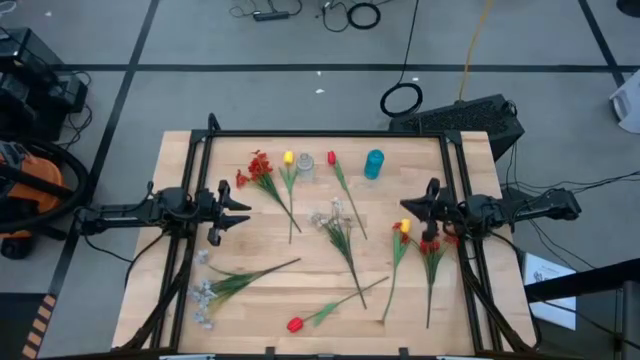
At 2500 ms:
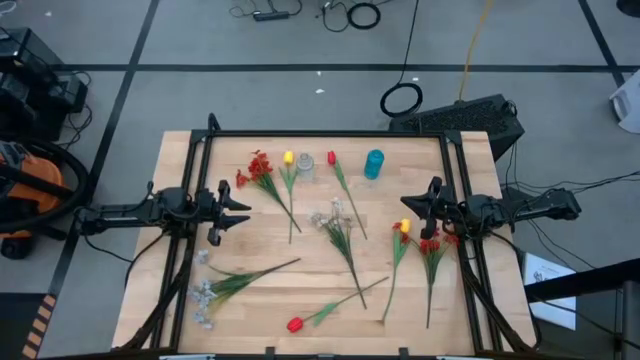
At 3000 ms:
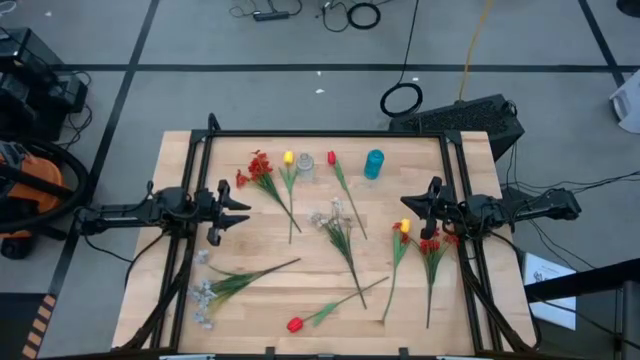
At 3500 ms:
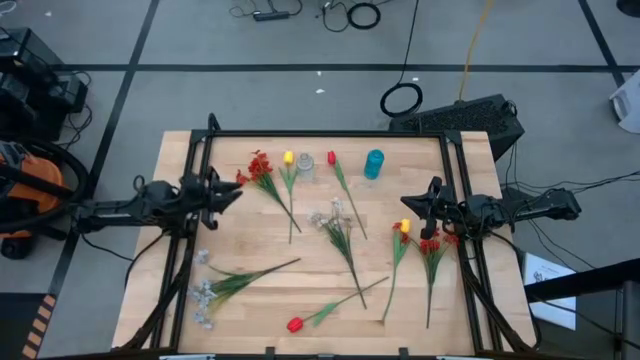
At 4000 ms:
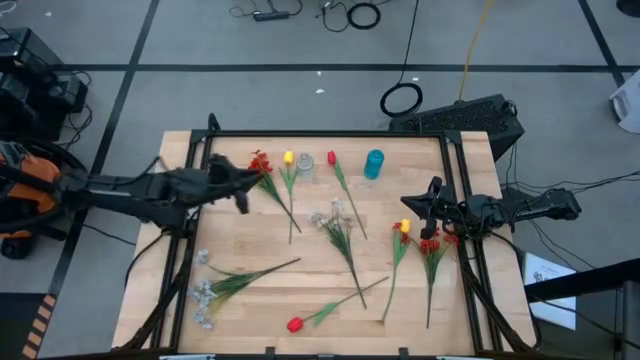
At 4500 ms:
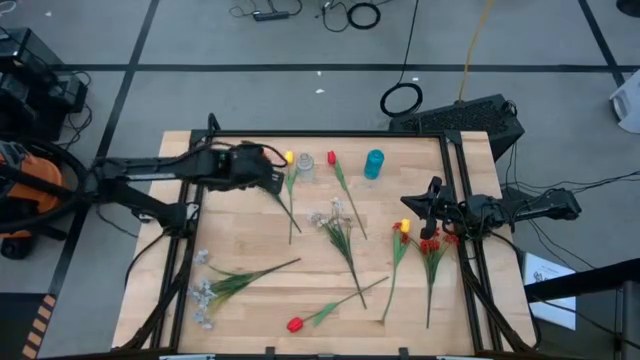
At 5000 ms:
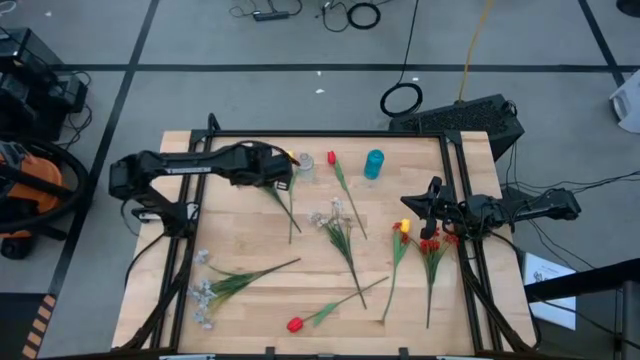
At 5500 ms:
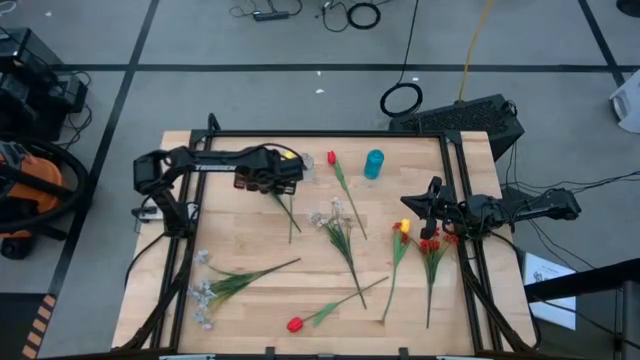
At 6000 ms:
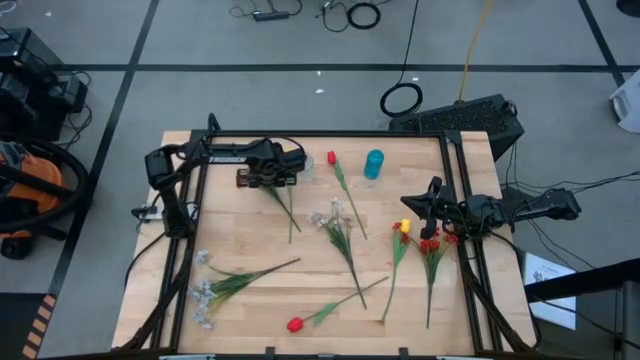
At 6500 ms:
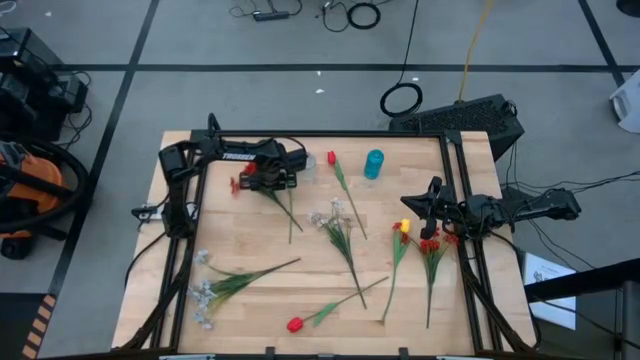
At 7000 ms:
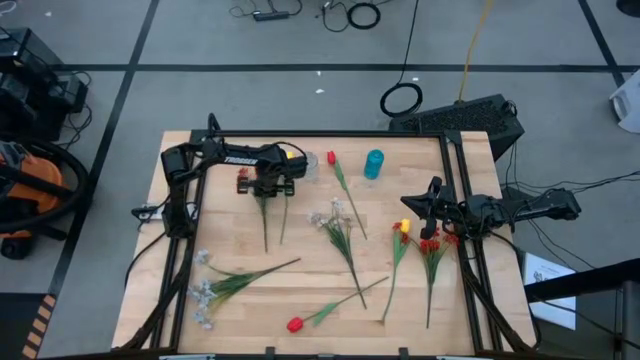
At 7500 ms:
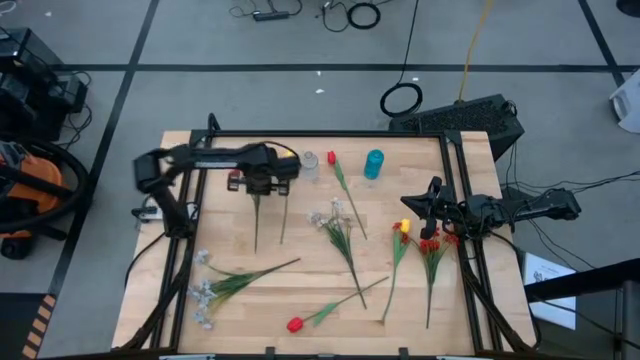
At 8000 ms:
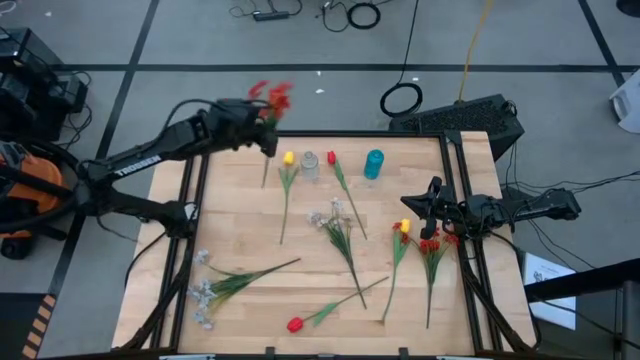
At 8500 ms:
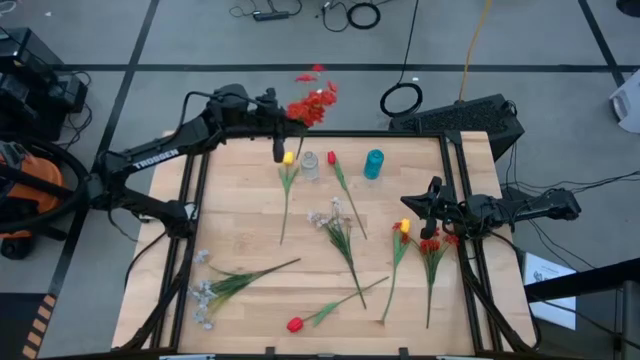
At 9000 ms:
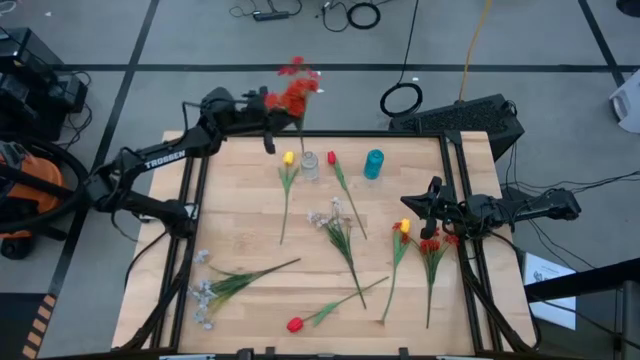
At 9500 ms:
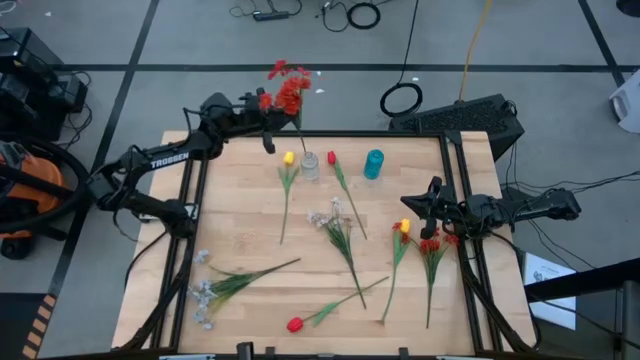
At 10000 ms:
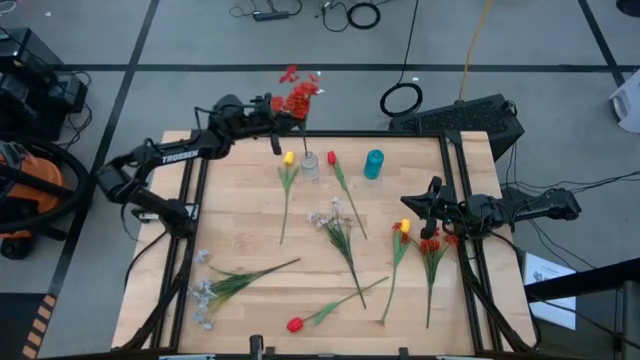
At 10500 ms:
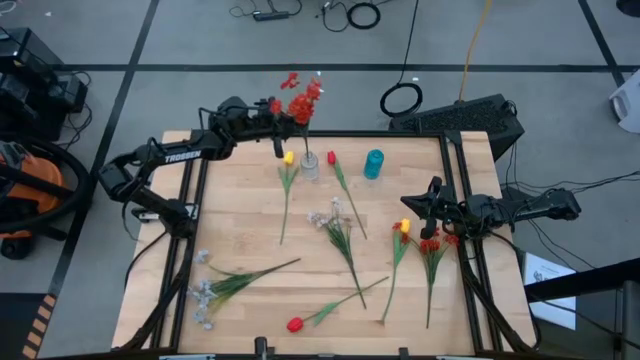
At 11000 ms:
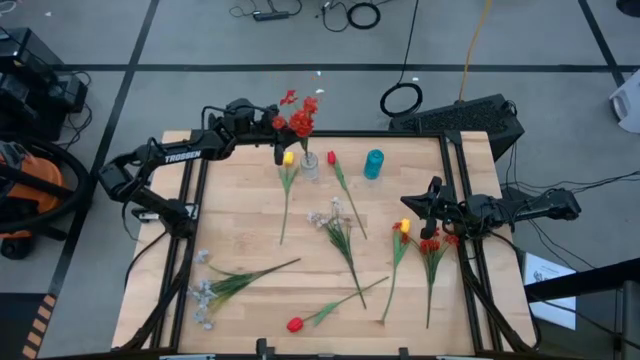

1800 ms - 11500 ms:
Task: Sort flowers into vase by color
Put the left red flower into the transparent vase

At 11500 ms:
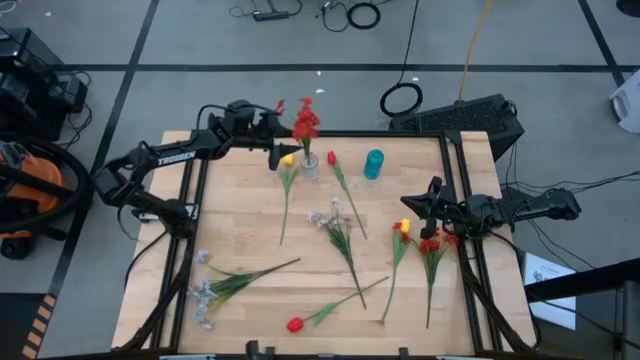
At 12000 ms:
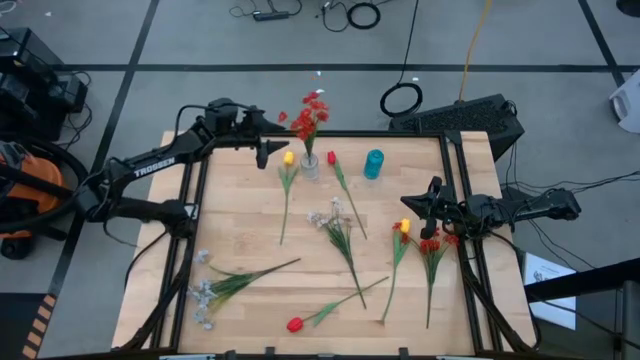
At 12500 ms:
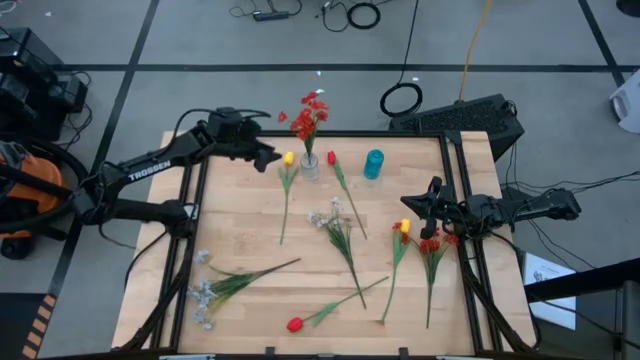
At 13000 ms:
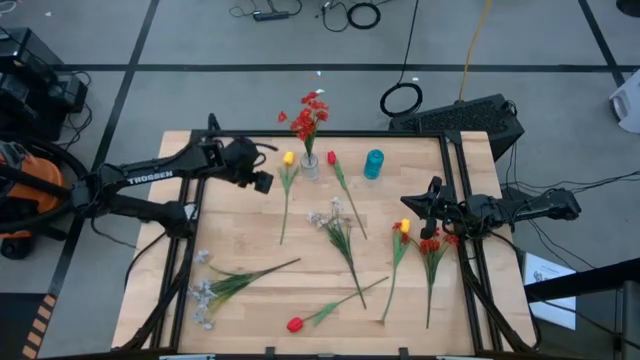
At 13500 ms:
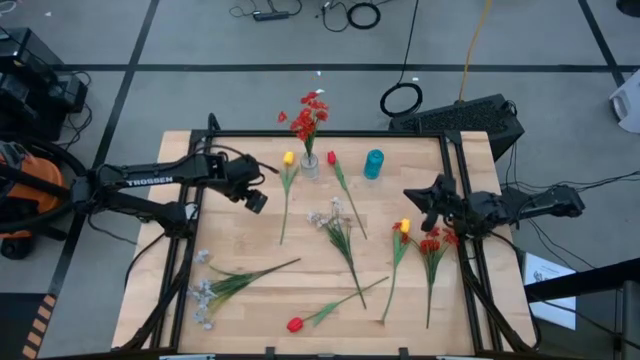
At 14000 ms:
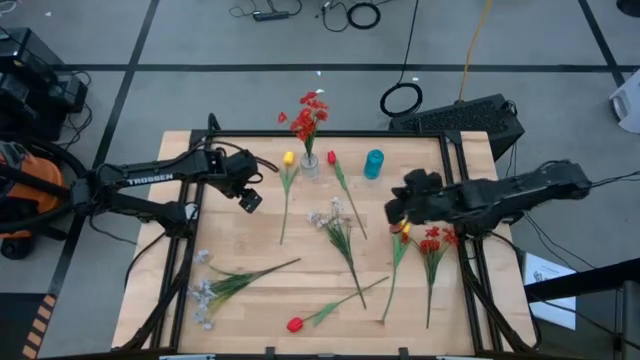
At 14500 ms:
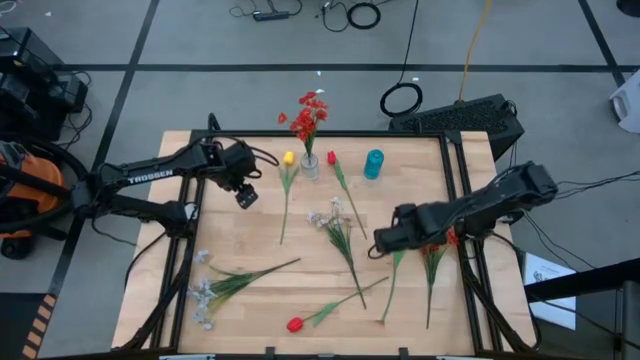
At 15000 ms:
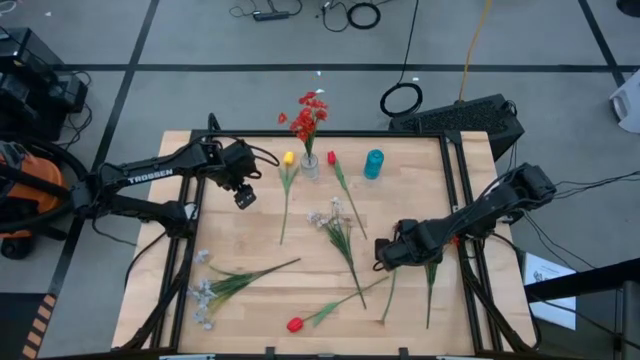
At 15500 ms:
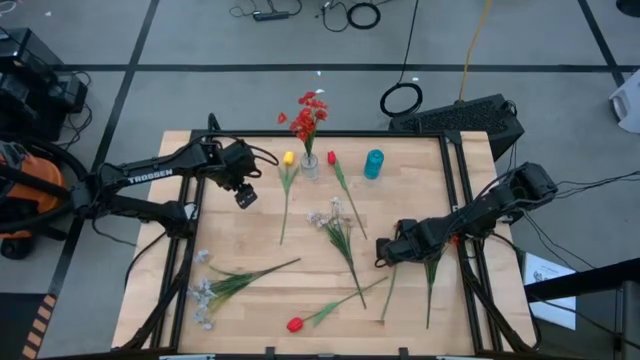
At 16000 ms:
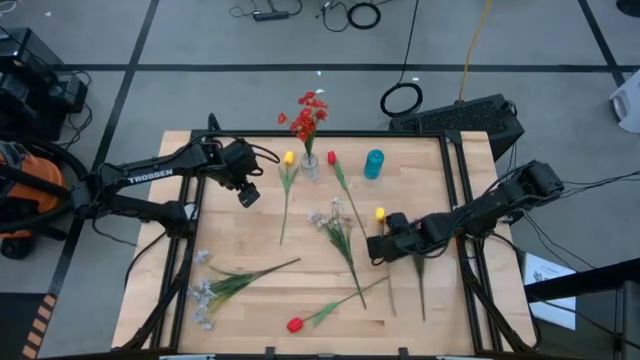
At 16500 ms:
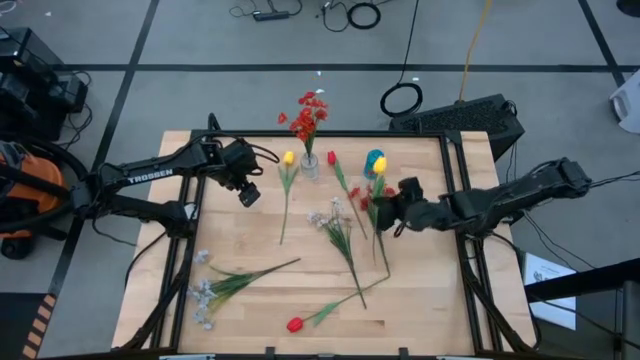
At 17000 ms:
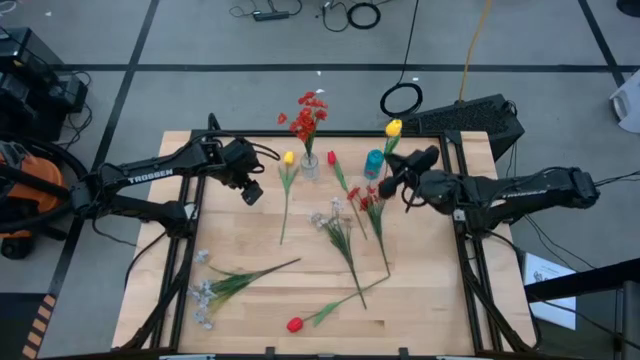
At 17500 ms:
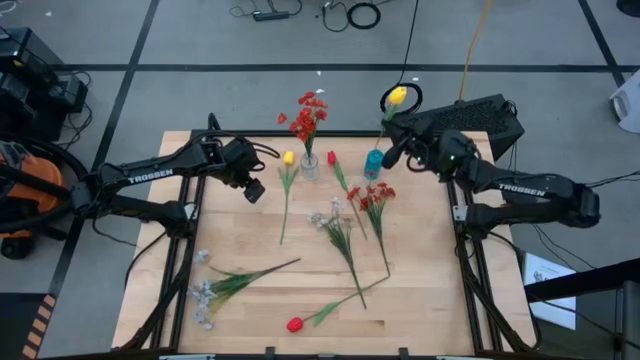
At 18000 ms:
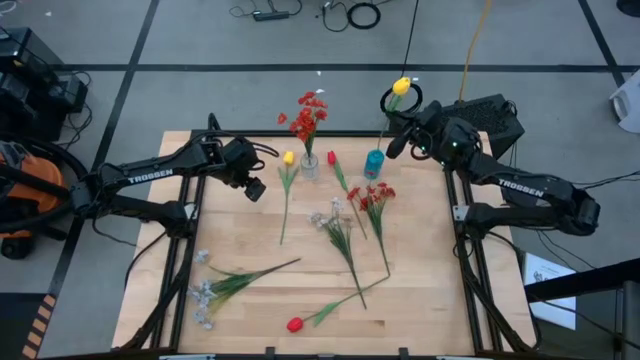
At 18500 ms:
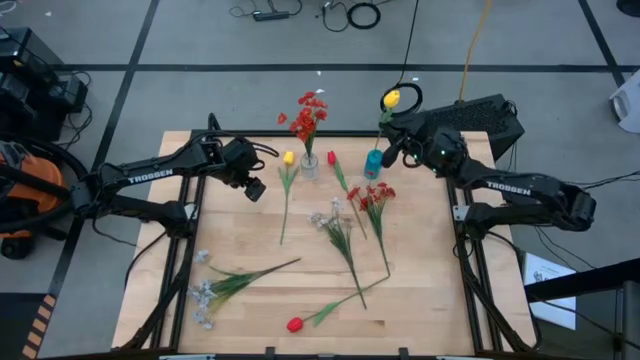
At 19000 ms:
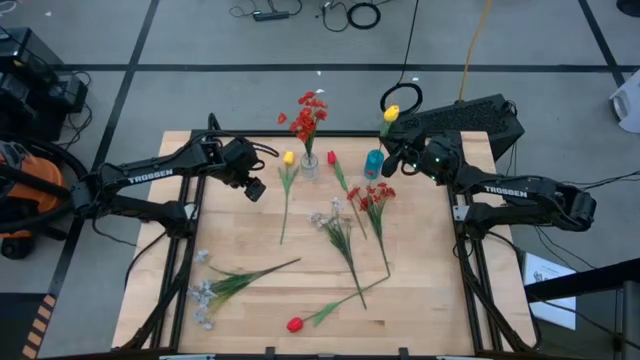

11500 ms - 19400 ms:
Put the right yellow tulip into the blue vase

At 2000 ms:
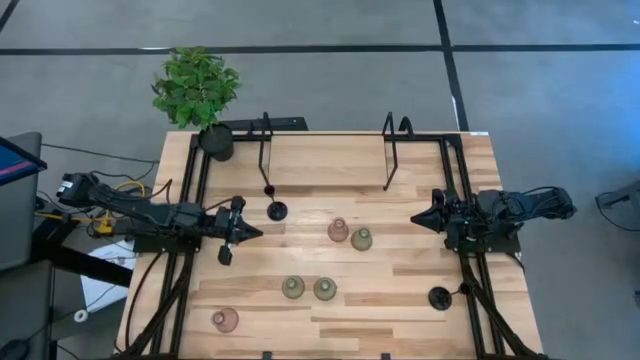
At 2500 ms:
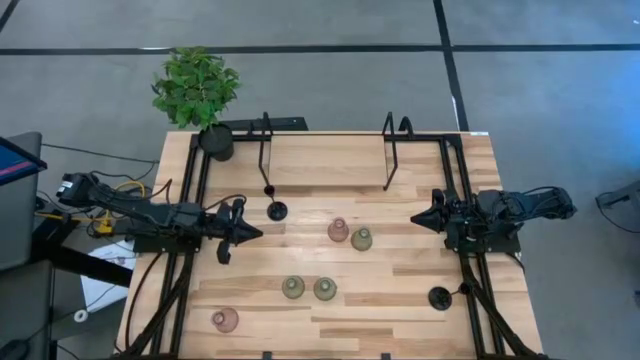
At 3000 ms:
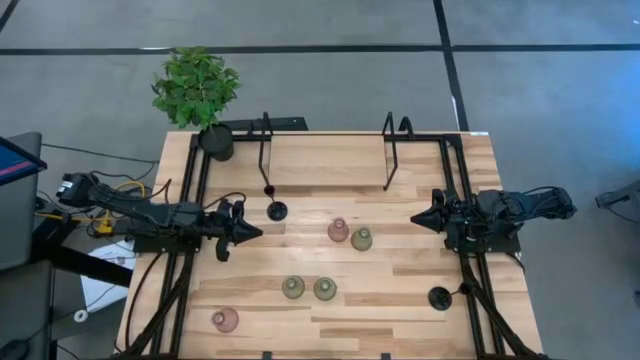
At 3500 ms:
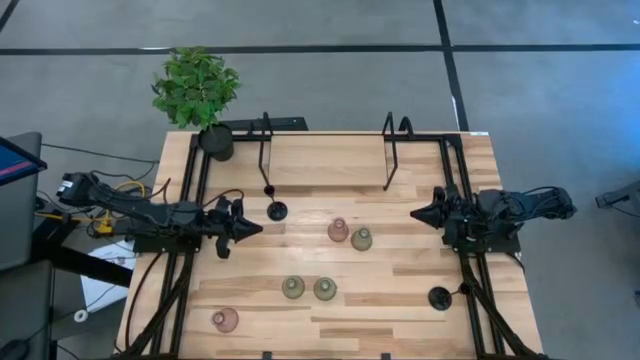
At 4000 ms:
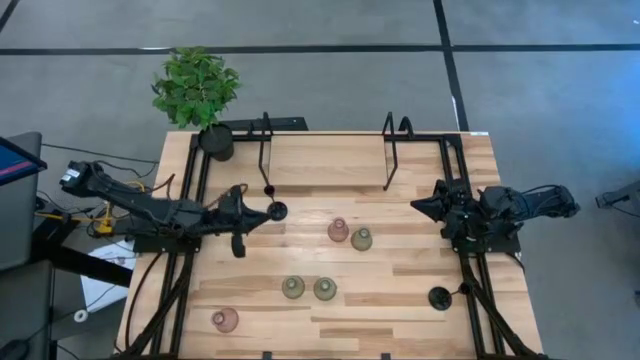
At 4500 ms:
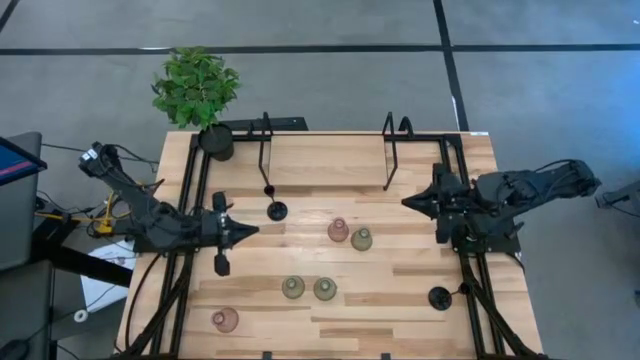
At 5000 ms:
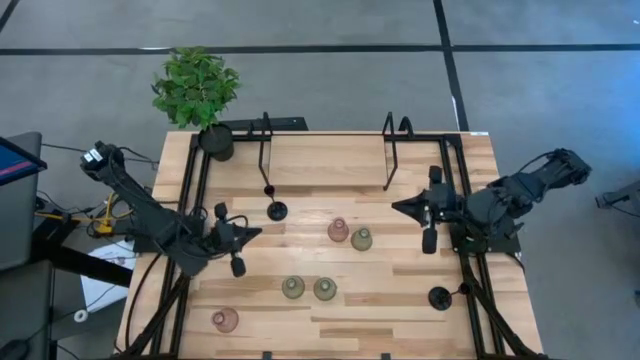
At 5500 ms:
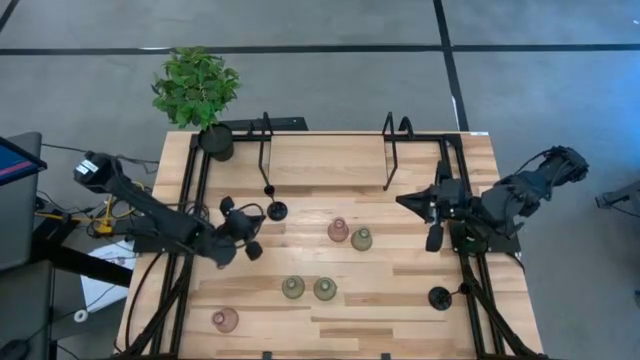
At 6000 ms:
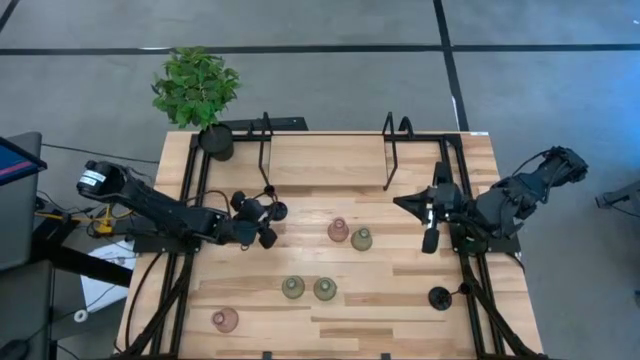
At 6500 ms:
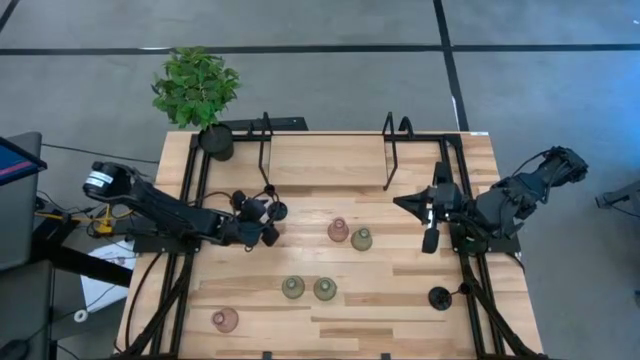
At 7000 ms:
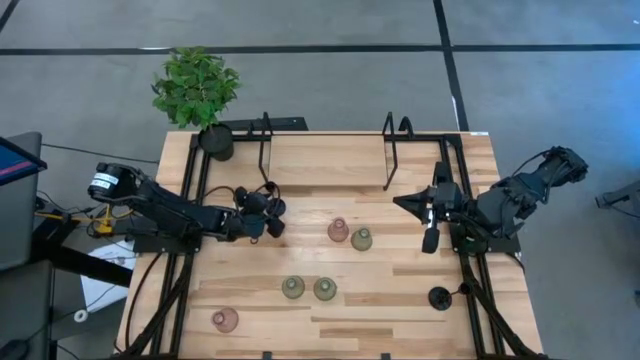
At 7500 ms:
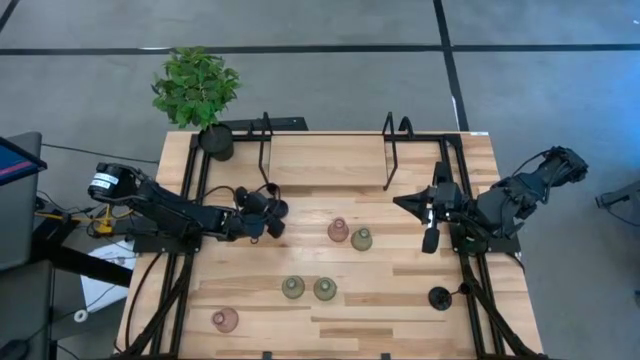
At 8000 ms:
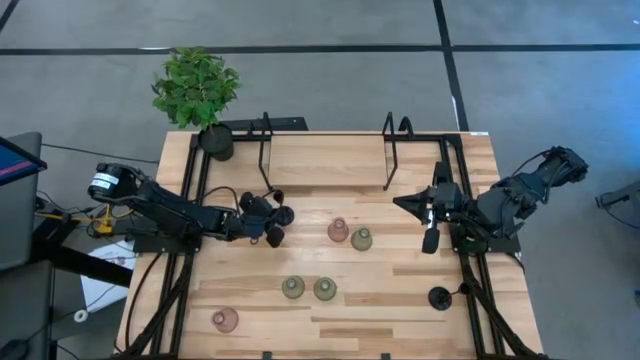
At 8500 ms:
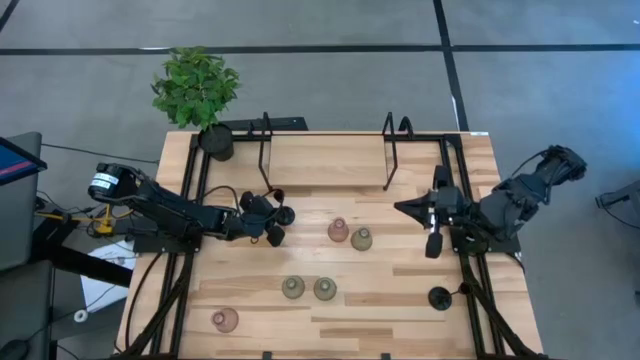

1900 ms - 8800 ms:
Task: Pick & Place candle stick holders
Put the black candle holder on the shelf
